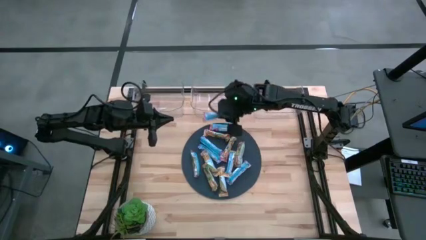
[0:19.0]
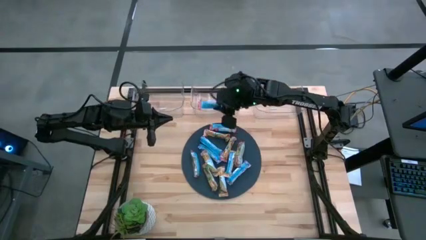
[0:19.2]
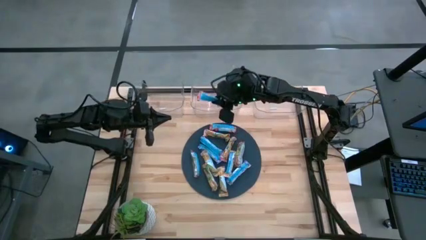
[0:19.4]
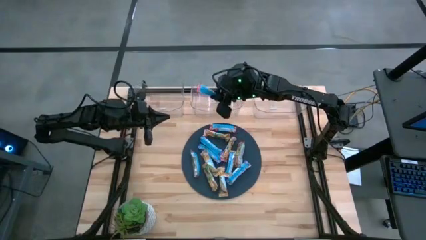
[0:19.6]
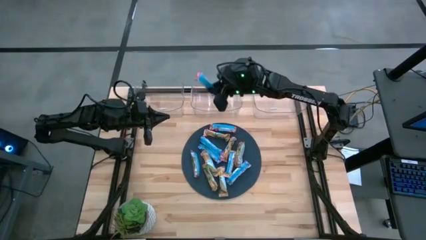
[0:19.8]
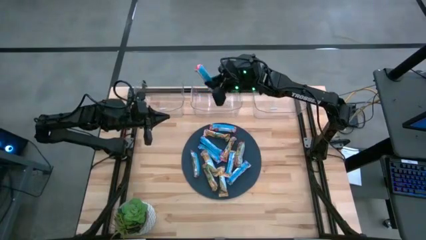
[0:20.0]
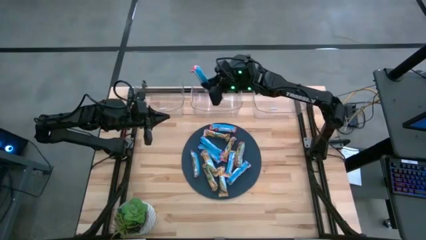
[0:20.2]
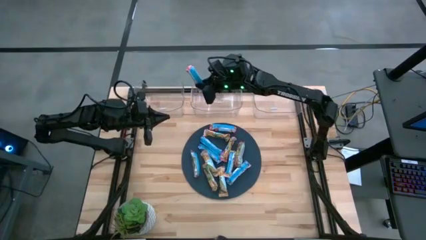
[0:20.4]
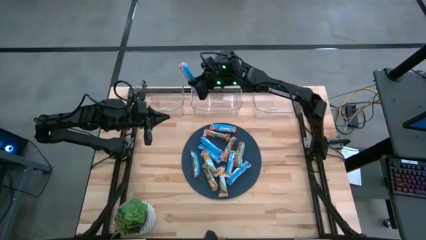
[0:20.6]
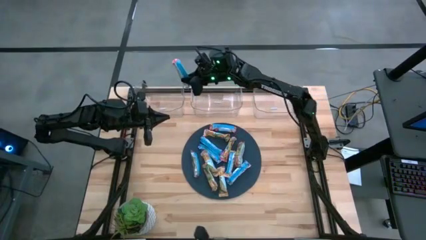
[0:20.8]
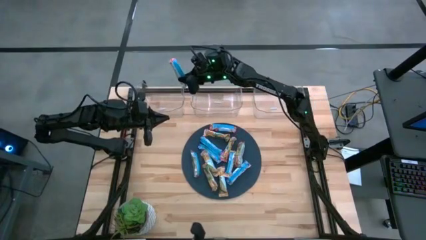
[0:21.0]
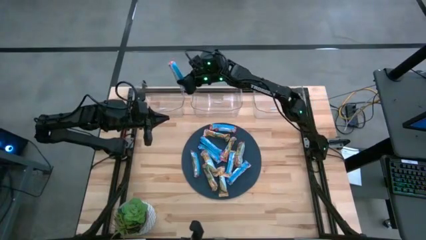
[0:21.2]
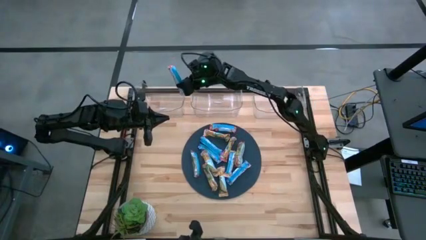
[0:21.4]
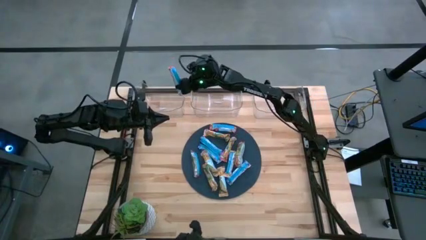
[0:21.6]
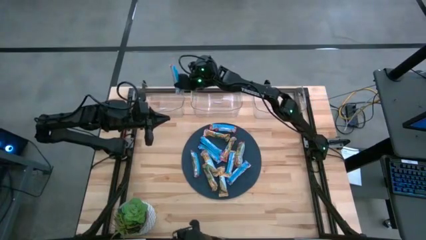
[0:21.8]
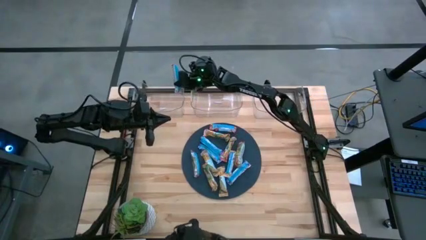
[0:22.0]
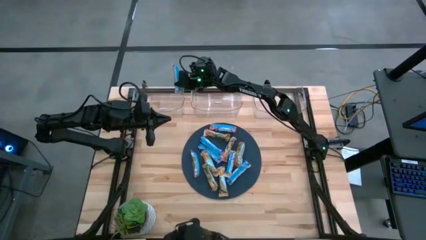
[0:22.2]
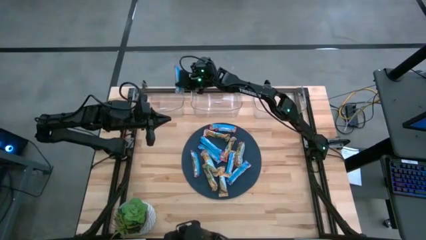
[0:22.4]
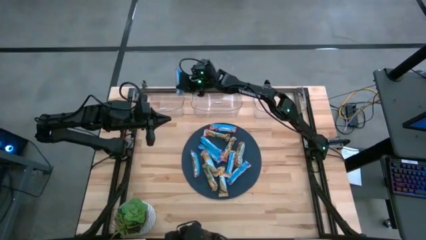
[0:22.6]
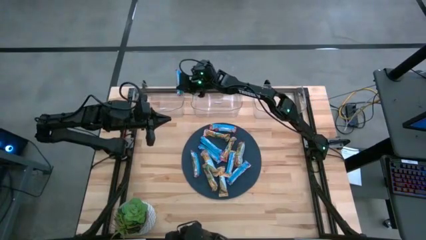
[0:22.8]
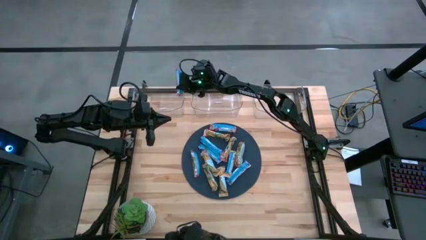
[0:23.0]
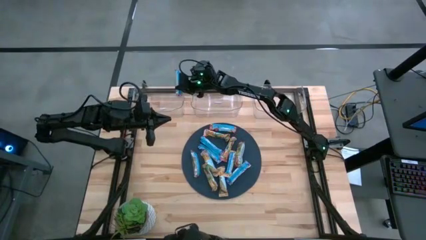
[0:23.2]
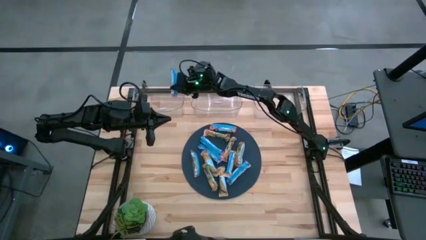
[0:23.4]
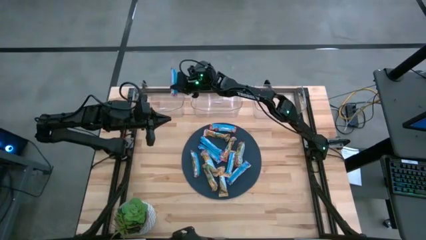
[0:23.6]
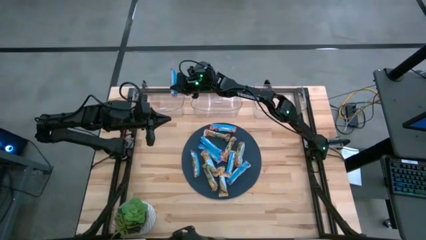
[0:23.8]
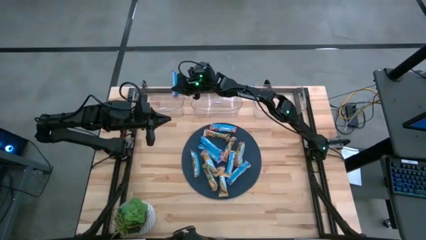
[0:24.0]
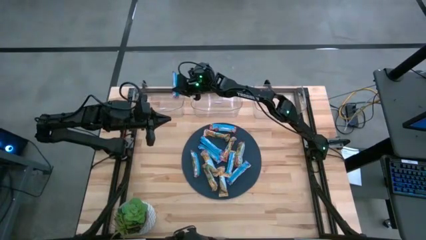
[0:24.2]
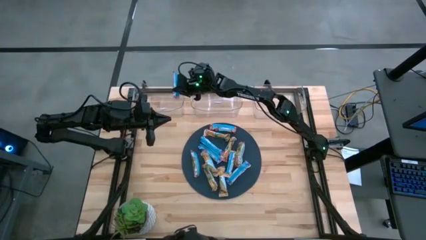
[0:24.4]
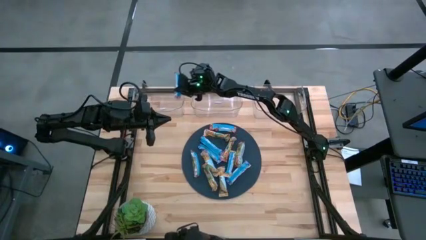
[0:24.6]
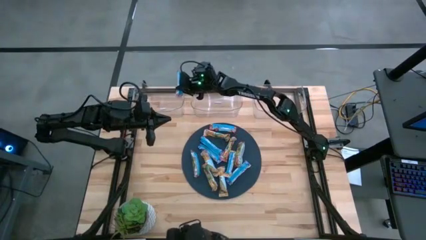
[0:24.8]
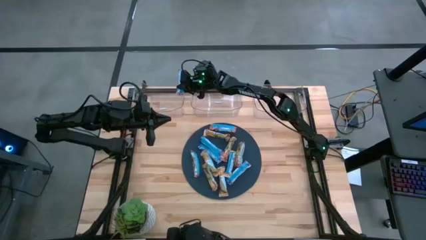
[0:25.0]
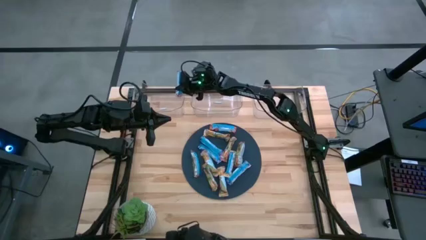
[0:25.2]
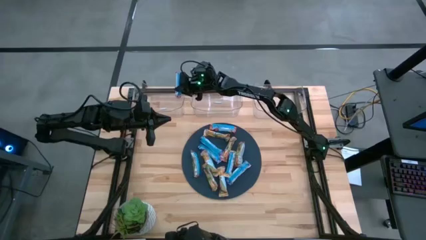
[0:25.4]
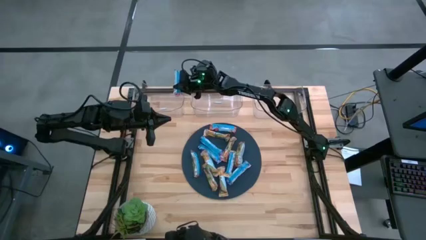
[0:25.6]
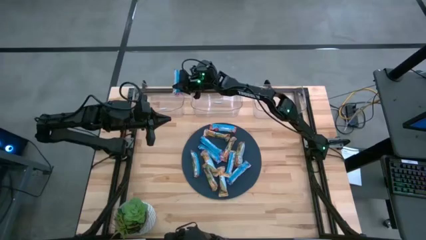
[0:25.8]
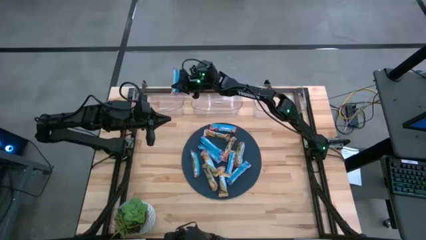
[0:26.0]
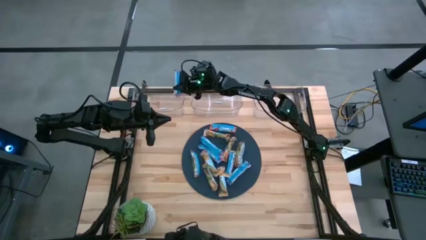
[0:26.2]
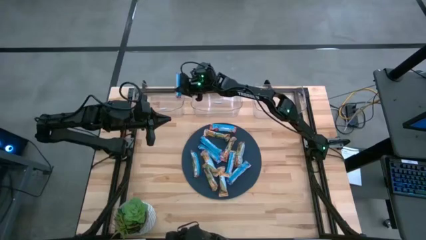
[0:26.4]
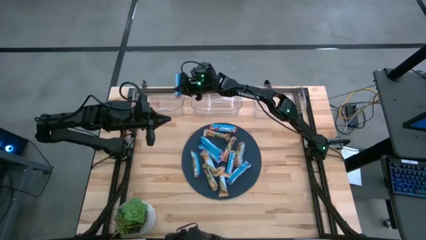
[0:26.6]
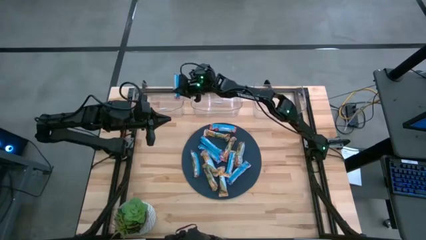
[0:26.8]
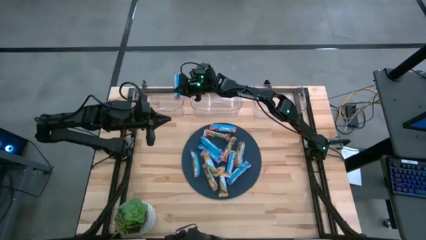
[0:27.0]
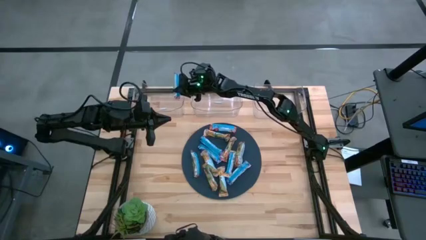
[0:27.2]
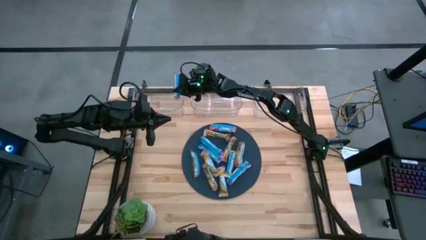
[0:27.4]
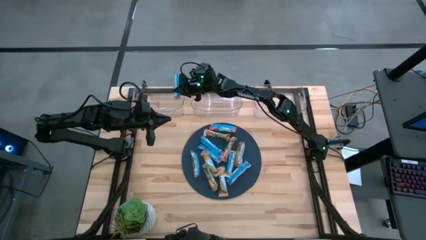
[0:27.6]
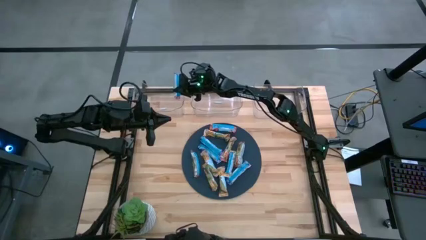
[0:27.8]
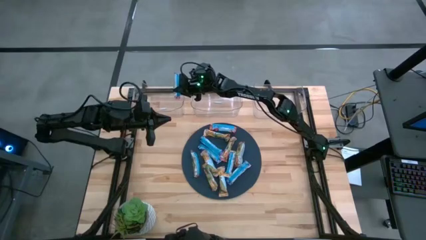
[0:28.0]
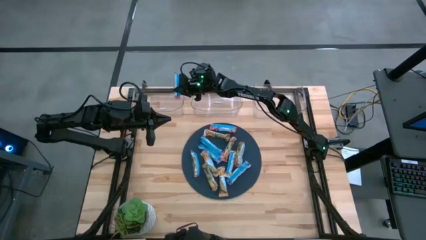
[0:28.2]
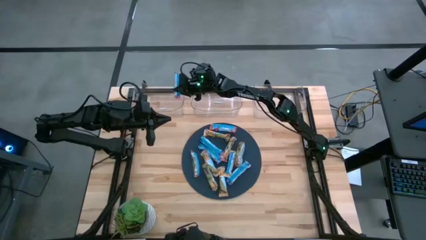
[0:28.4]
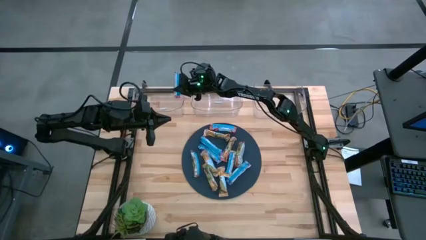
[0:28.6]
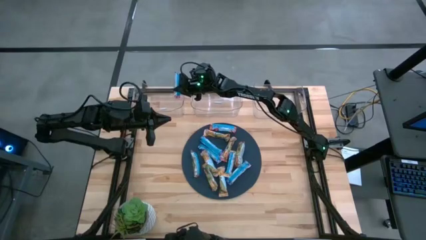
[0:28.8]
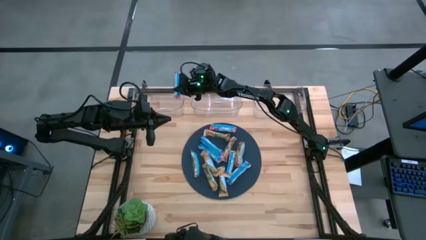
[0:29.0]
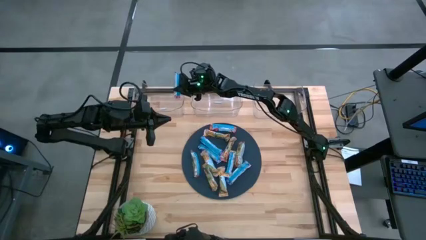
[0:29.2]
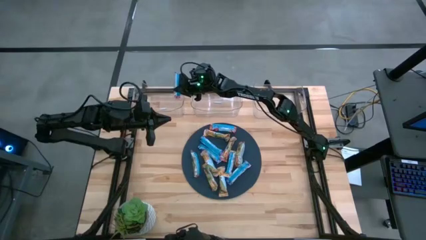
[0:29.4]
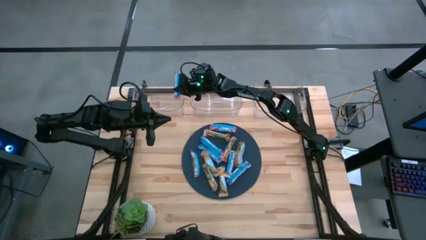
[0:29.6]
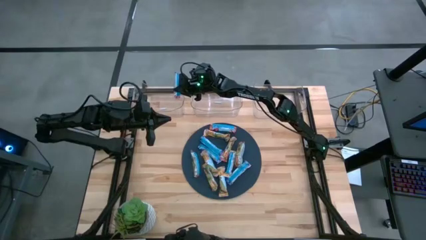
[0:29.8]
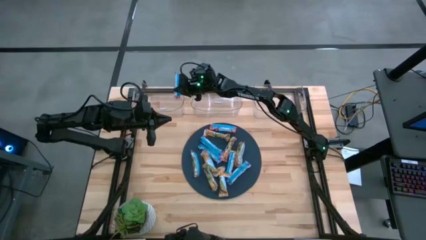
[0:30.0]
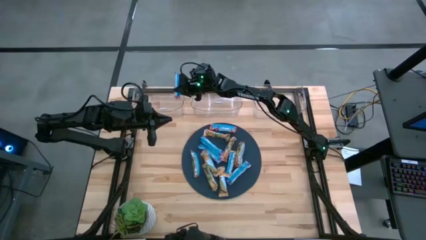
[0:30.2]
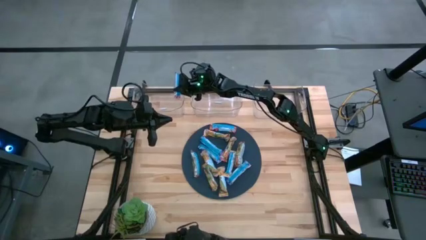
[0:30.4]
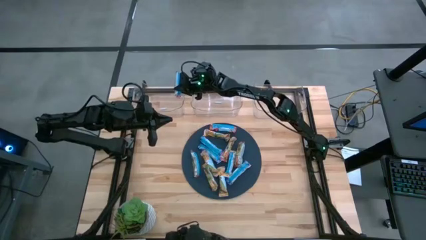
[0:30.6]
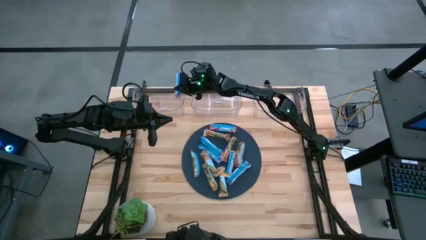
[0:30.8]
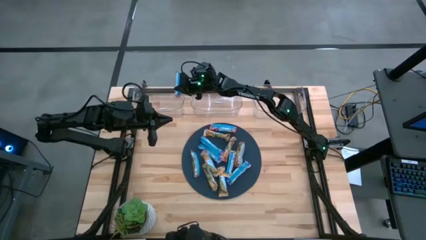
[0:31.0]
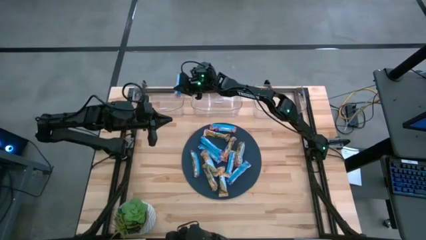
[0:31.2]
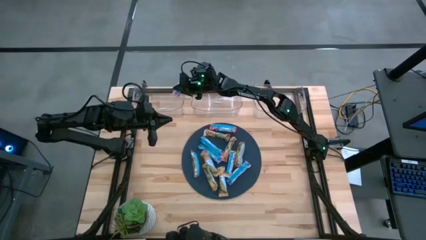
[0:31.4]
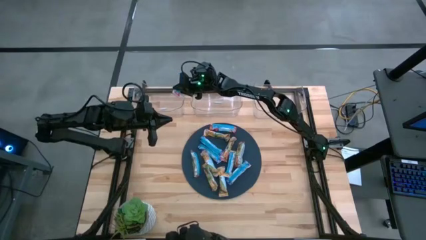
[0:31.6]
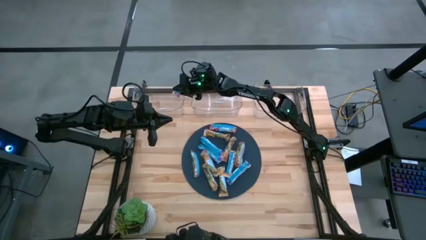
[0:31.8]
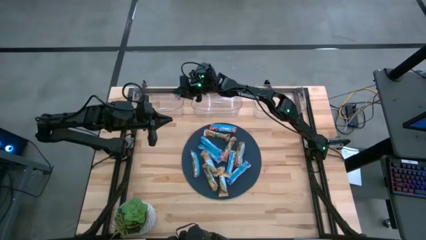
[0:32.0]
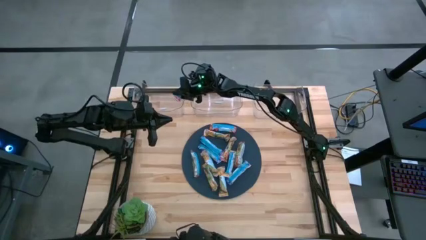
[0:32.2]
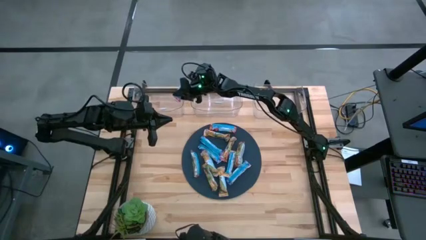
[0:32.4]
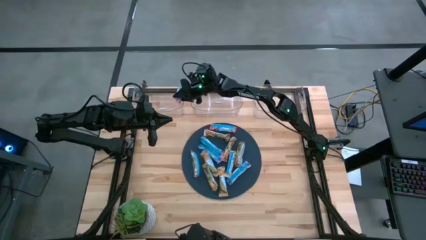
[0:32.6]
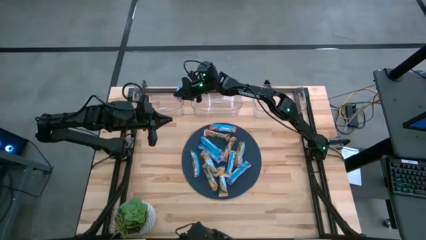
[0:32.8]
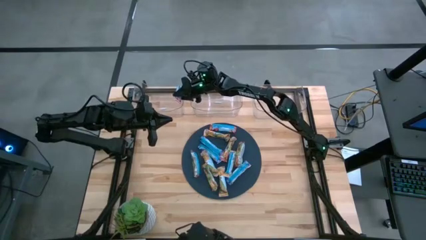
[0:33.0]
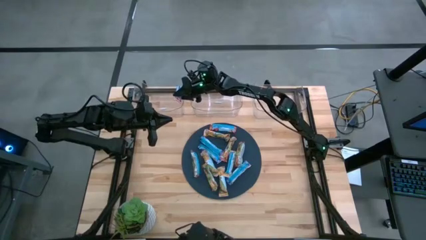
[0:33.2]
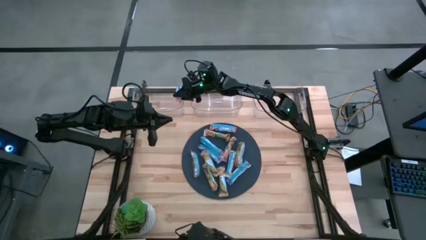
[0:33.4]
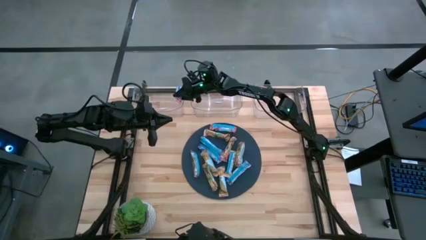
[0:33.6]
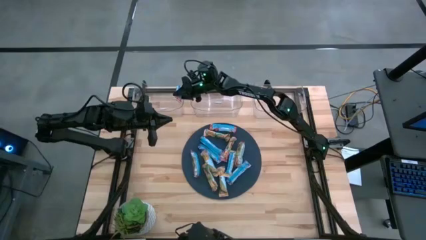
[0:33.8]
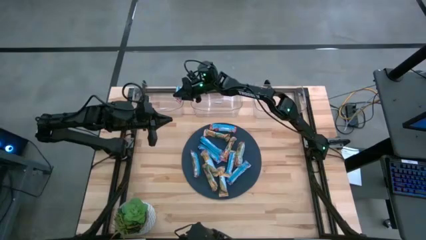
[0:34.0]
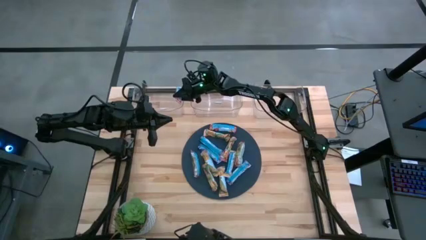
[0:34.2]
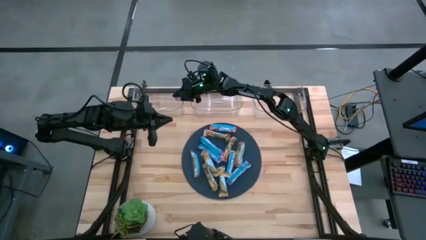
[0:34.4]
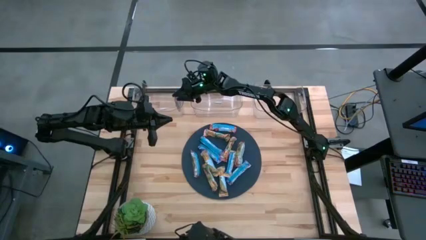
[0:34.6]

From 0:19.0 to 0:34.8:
Task: Pick and place Granola Bars by type
Put the red granola bar into the left transparent bin
